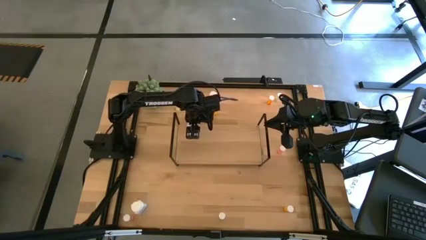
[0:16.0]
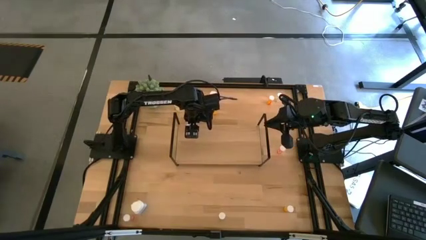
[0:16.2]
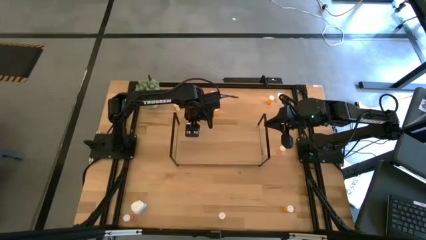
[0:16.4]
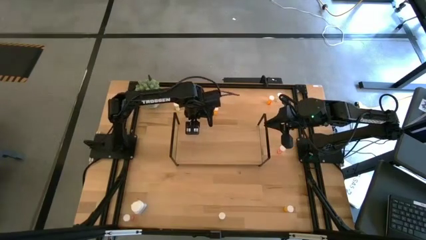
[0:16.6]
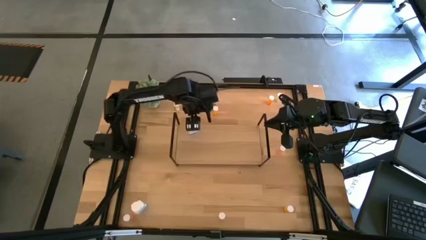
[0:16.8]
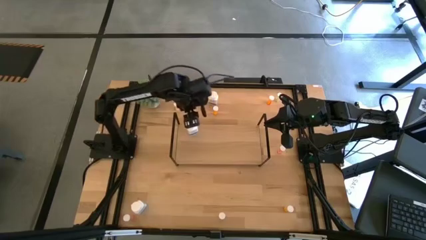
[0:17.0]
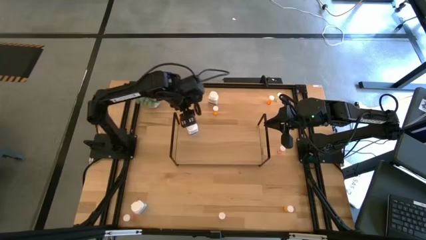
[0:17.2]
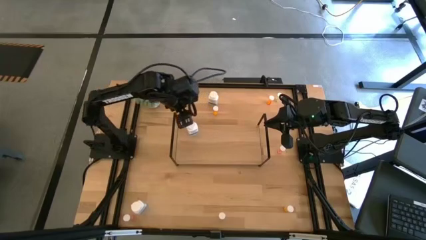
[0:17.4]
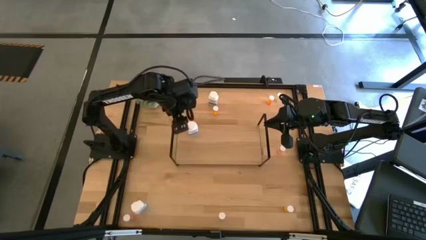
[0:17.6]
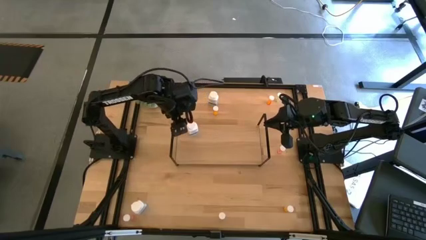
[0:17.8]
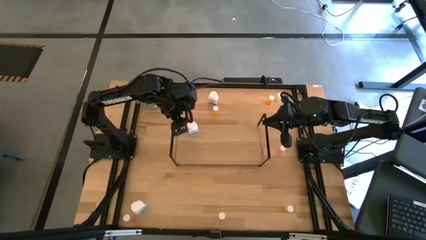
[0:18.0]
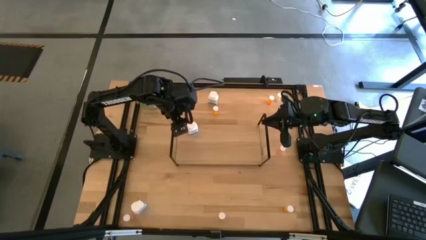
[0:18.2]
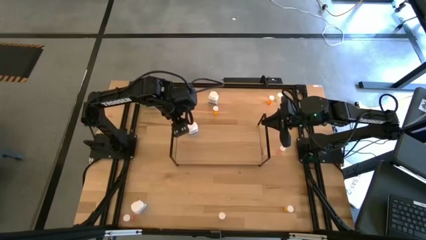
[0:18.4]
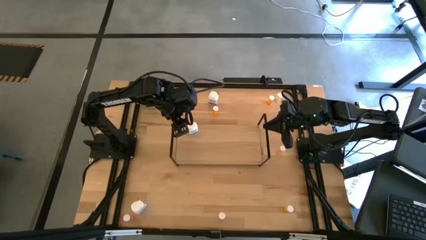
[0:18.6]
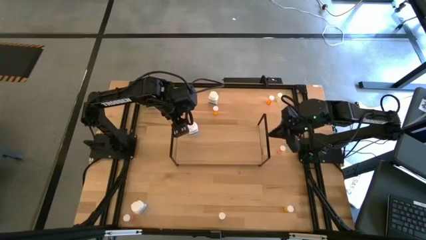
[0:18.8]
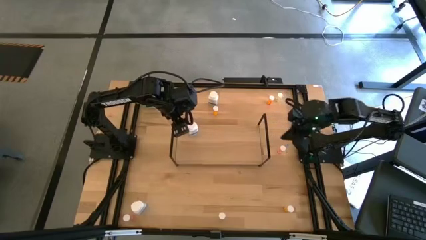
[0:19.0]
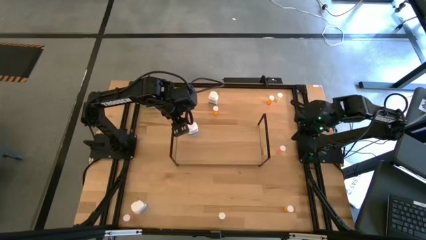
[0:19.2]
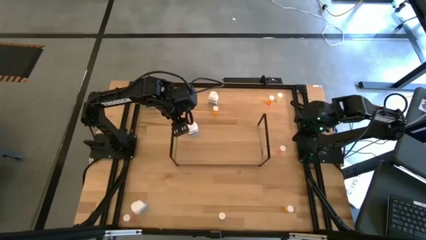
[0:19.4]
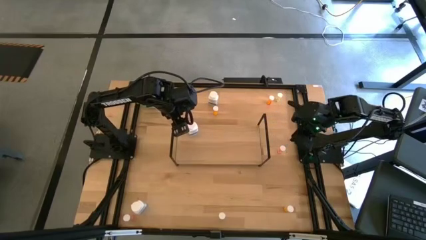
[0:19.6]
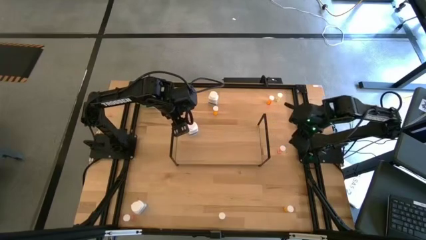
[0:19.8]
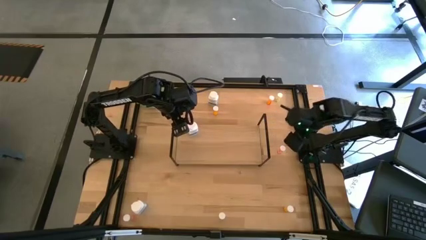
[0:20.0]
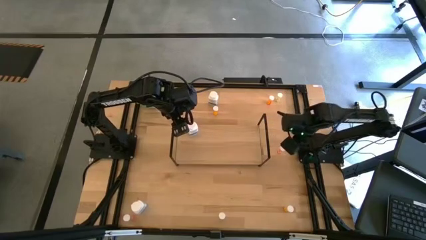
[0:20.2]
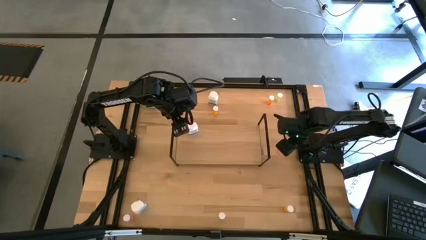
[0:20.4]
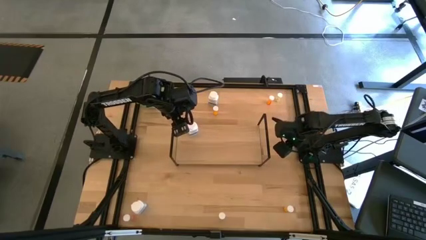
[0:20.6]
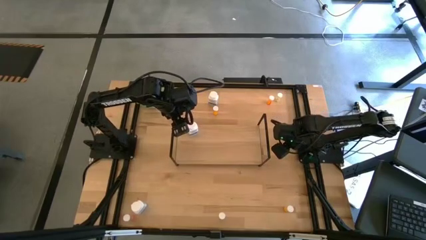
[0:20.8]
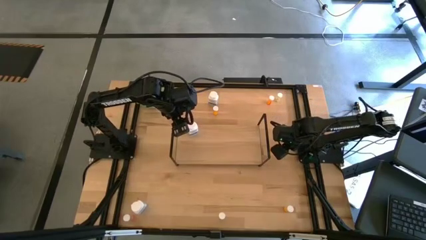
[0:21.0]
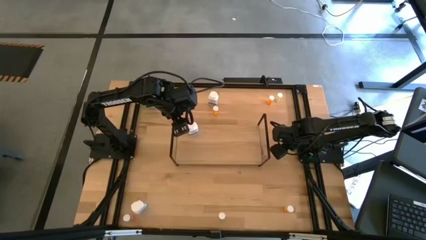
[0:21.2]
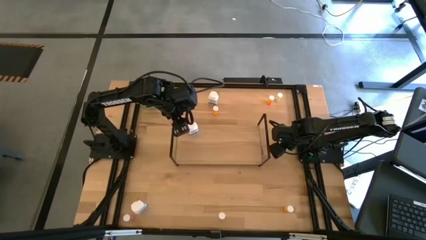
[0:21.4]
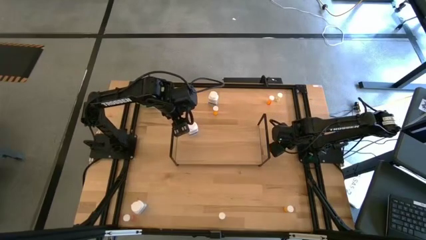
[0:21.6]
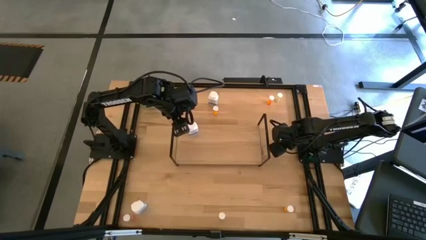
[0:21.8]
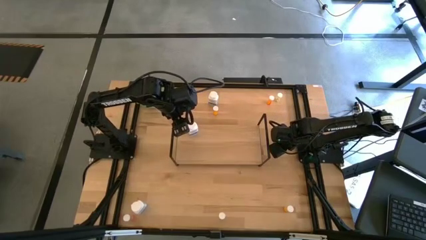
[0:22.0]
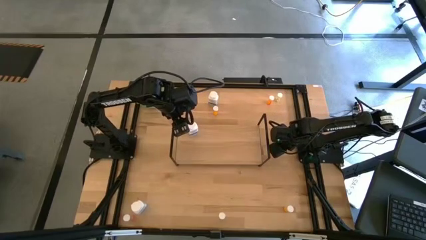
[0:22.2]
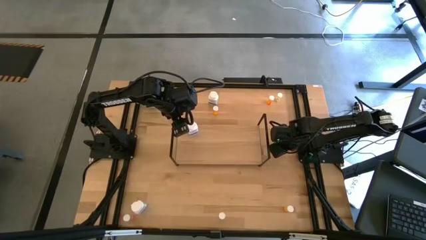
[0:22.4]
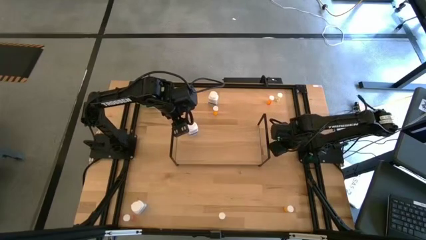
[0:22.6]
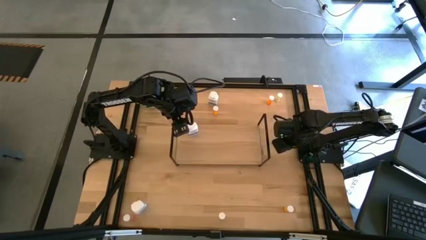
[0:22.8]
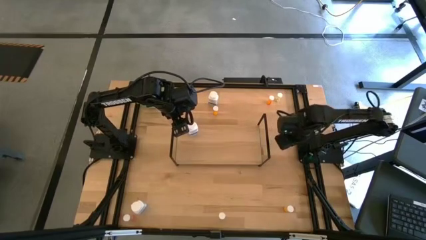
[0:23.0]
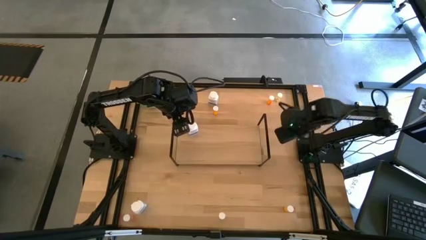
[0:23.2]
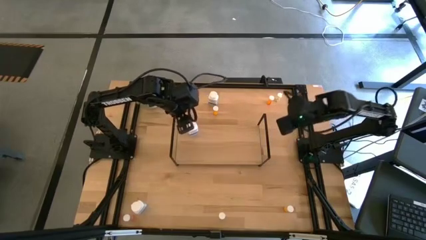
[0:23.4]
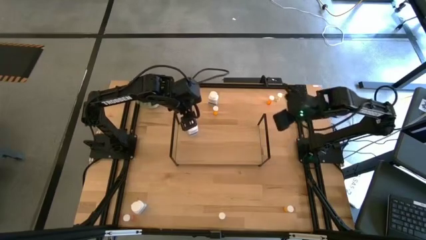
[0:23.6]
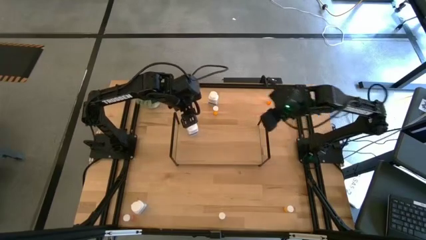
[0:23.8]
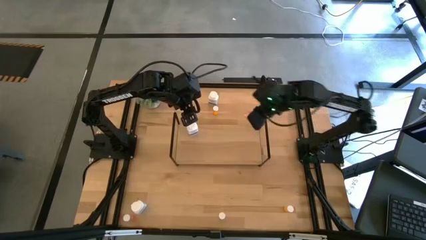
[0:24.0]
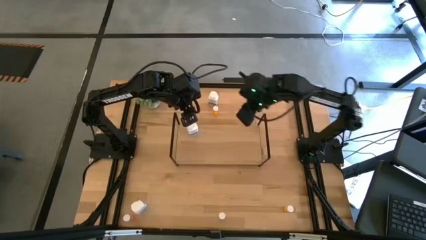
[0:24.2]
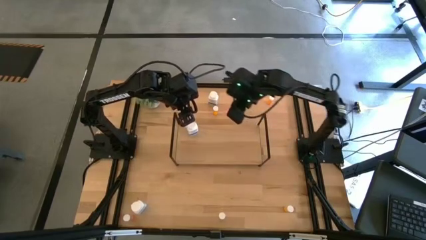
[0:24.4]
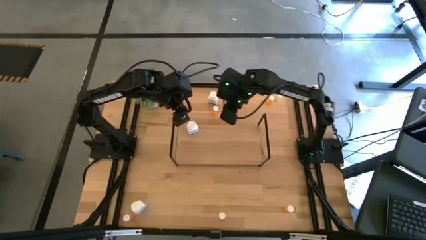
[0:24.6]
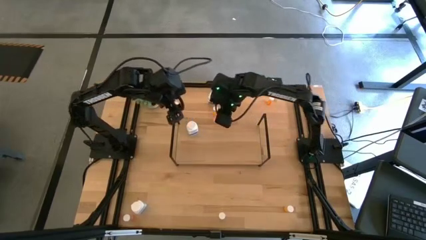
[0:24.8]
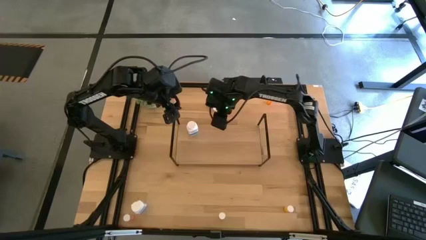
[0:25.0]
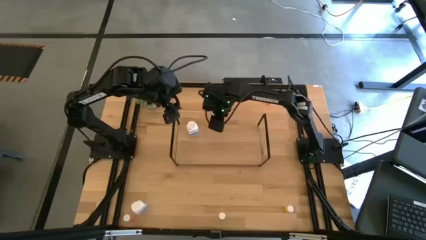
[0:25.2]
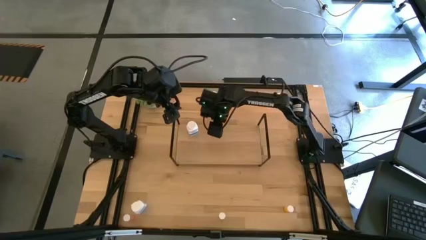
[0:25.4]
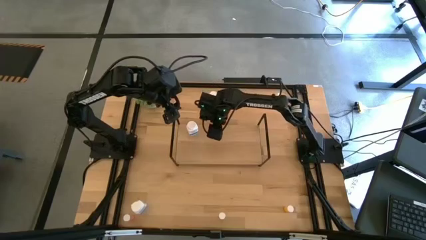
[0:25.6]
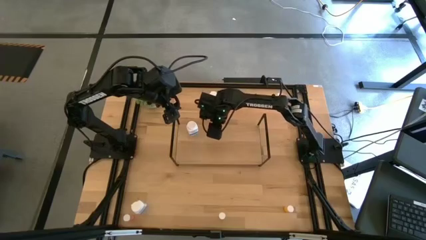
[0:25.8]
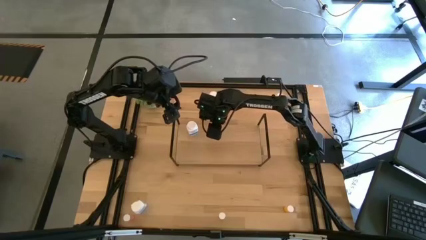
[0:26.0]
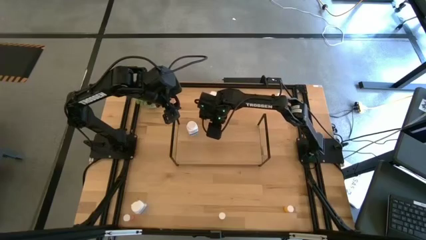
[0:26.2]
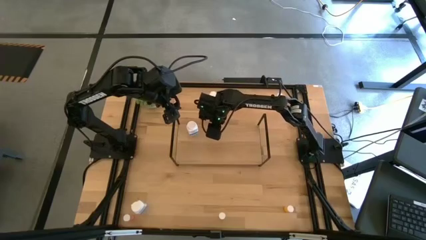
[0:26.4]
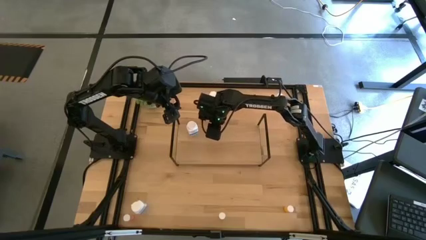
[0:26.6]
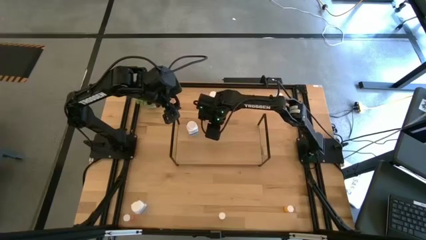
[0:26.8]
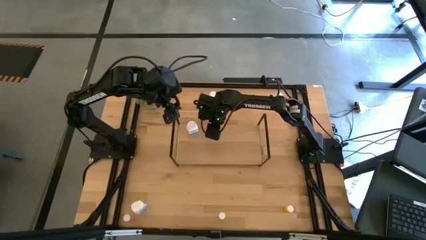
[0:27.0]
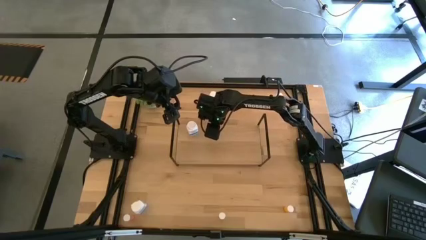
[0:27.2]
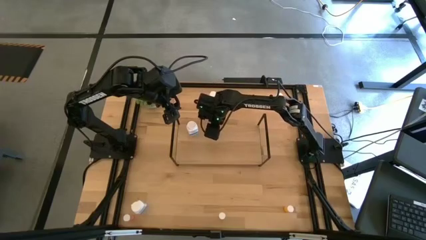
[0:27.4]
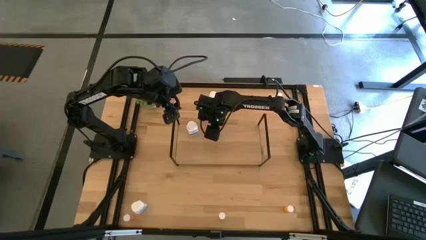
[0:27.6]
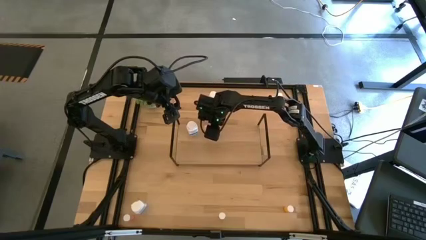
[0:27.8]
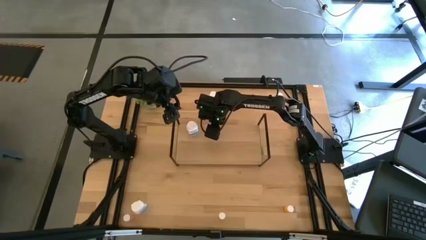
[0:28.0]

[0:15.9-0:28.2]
Task: Pick and place medicine bottles onto shelf by color
Put the right pink pill bottle on the shelf

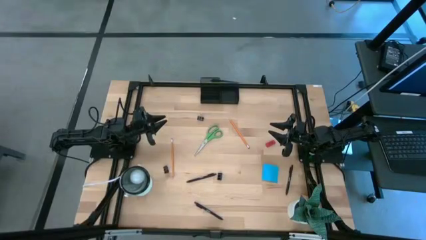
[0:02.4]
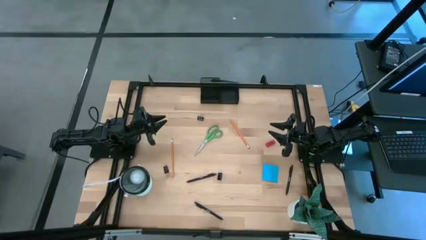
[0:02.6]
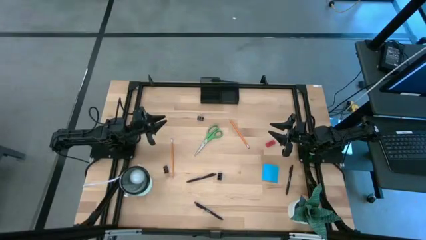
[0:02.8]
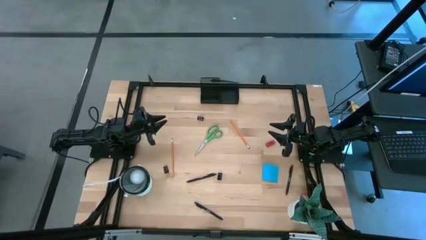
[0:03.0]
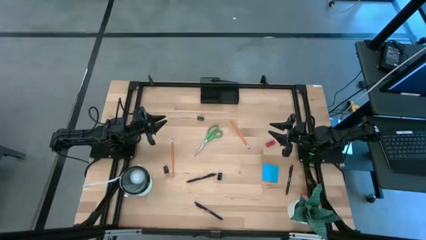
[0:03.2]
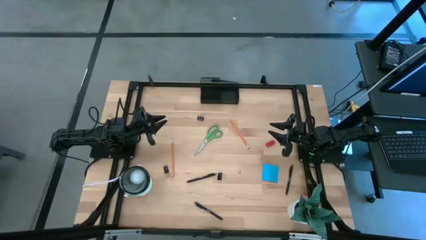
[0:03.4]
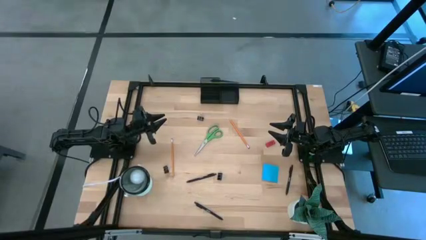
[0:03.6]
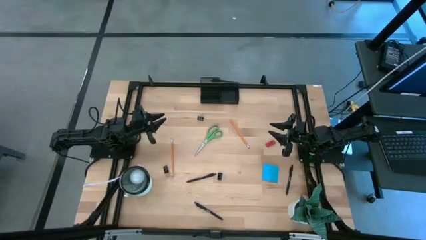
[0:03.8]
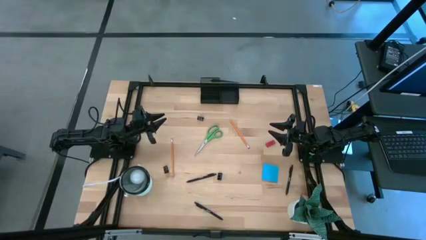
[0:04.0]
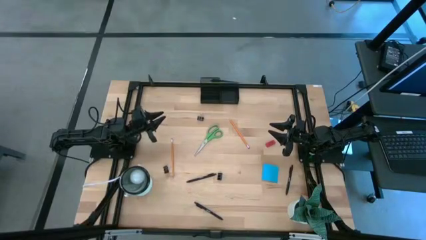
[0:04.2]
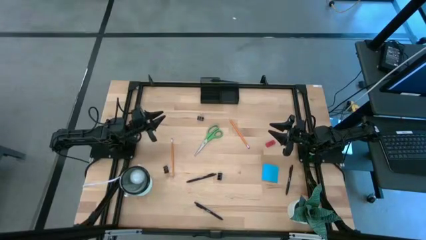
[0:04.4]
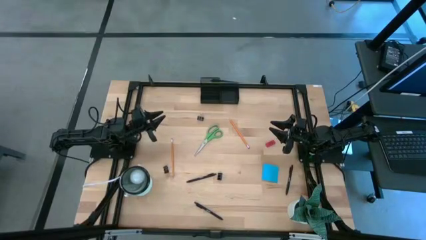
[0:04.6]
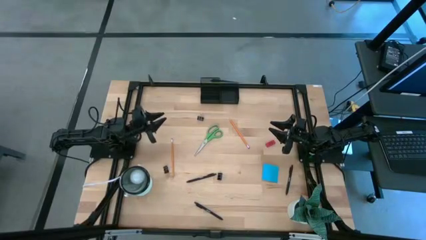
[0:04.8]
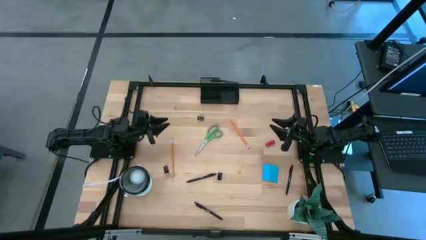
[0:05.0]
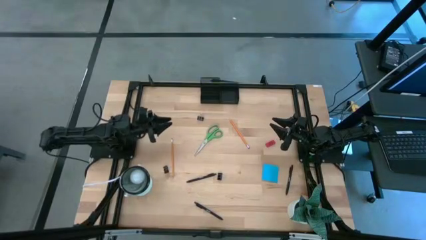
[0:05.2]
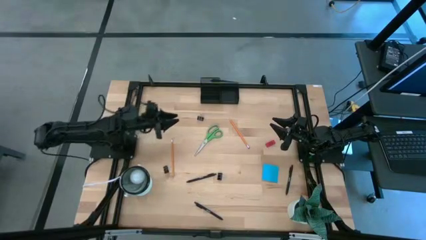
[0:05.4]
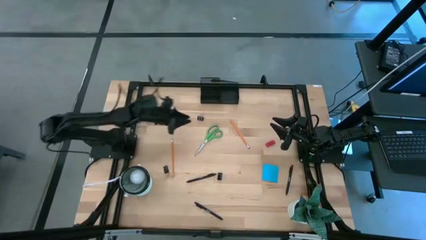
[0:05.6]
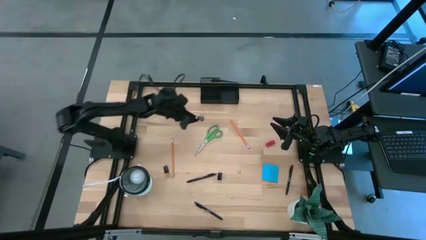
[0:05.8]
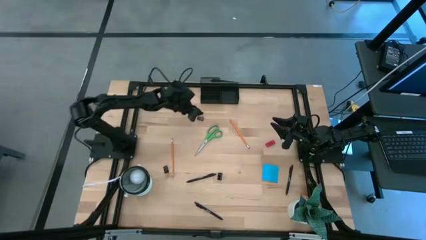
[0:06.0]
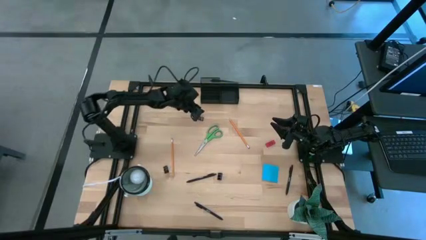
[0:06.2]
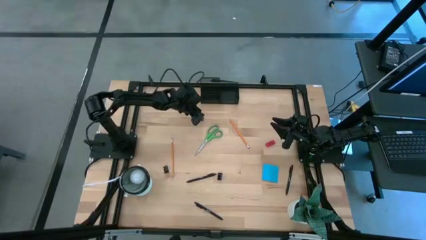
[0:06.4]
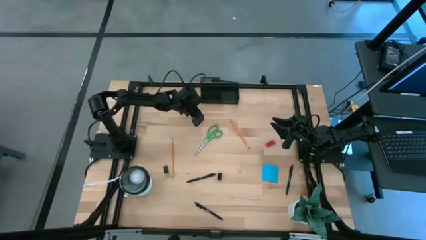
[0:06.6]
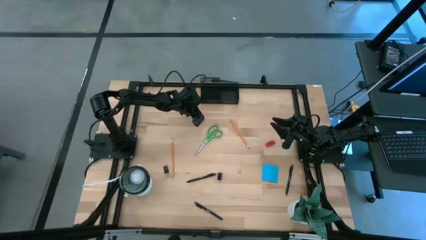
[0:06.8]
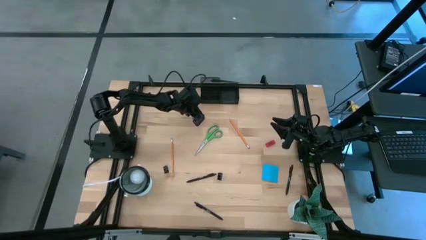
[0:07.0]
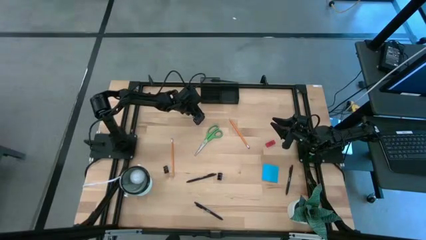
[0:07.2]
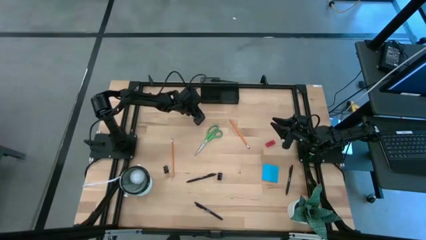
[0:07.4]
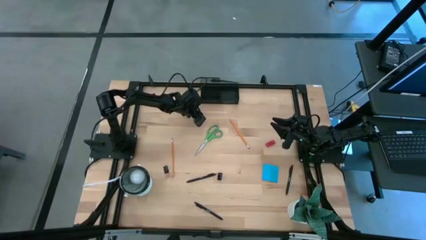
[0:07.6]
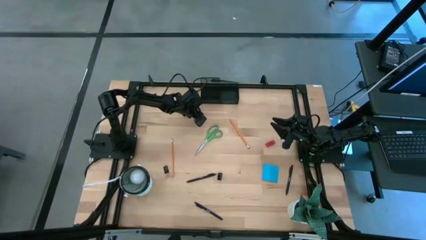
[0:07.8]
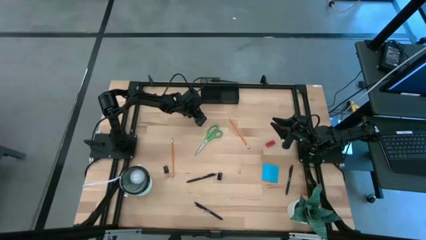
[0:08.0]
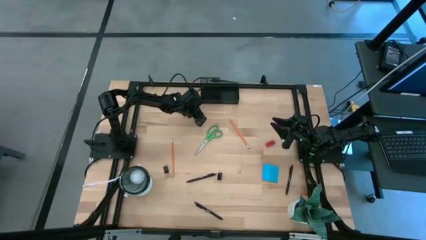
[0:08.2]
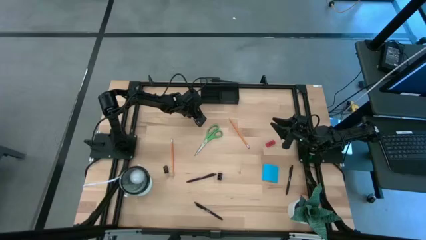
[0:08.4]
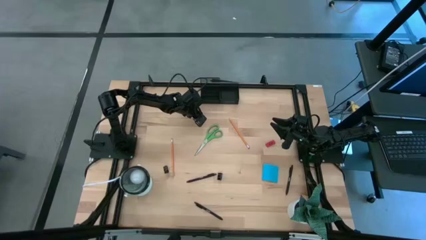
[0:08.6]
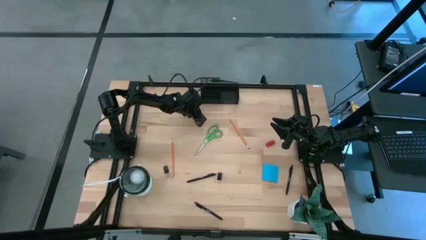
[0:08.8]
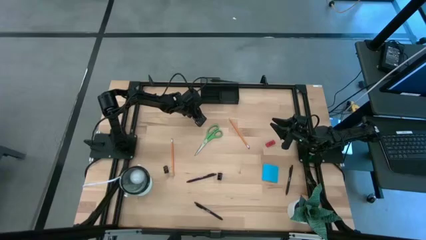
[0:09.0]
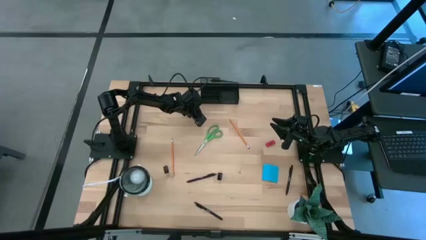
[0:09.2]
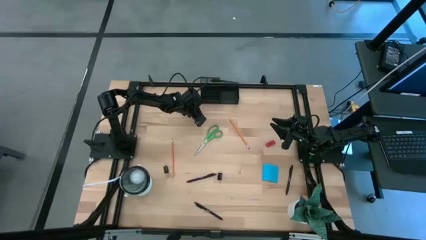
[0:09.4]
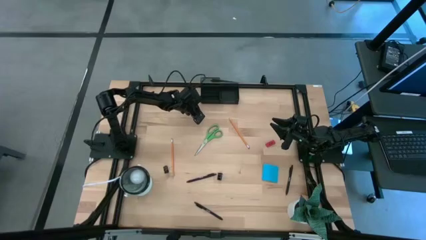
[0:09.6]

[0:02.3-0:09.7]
Task: Pick and place office supplies into organizer
Put the top black binder clip into the desk organizer
